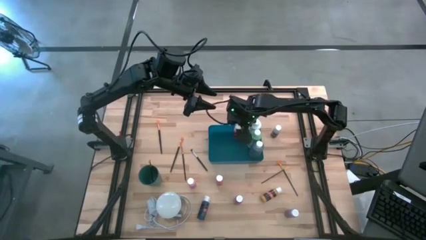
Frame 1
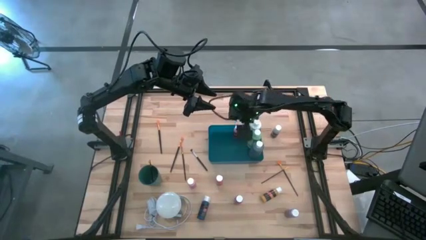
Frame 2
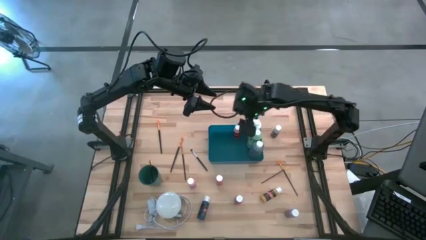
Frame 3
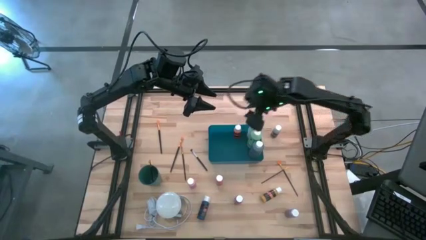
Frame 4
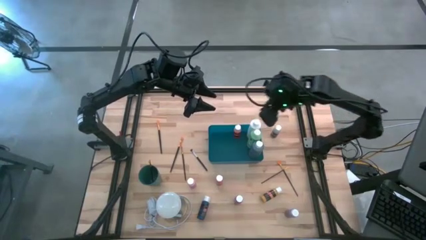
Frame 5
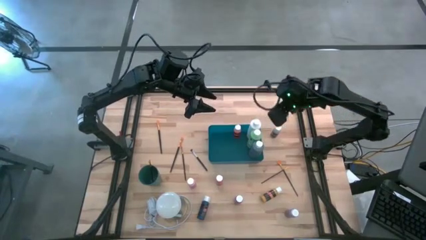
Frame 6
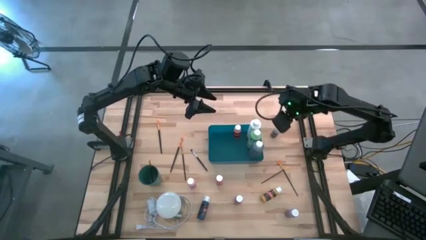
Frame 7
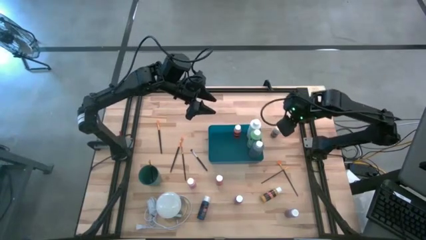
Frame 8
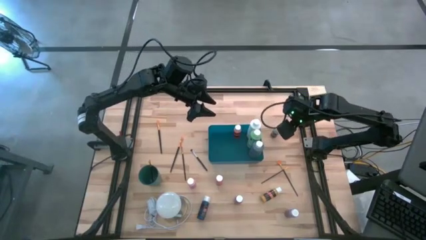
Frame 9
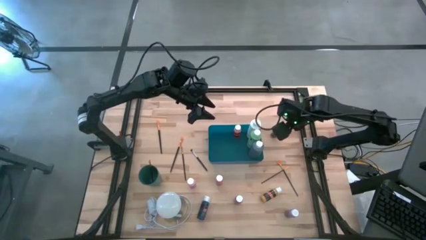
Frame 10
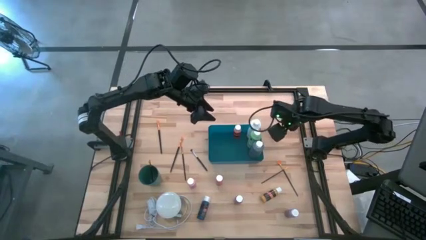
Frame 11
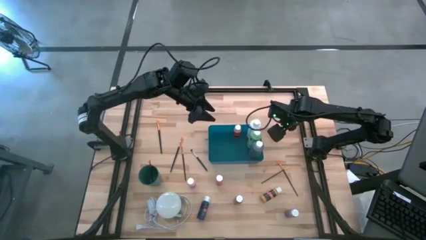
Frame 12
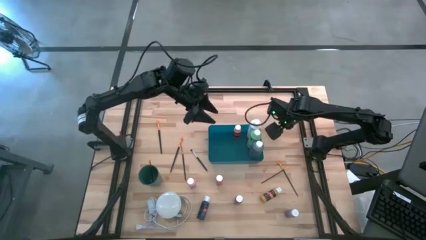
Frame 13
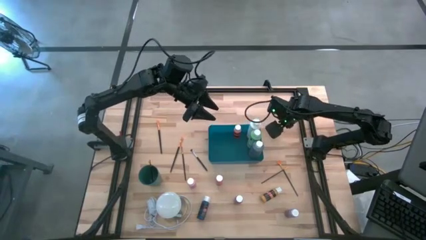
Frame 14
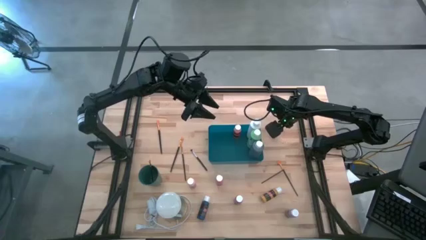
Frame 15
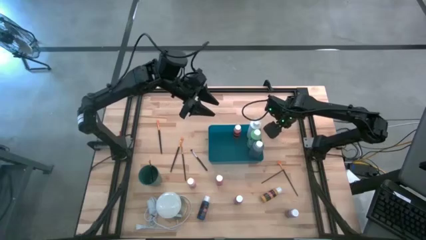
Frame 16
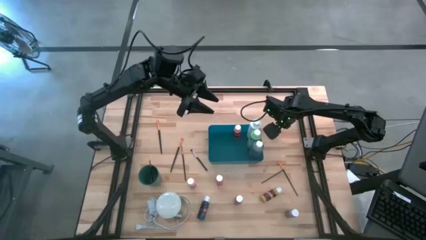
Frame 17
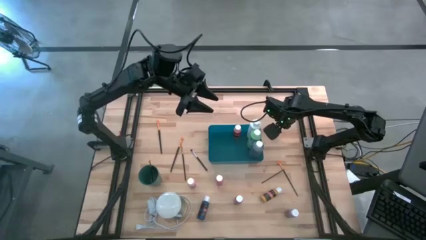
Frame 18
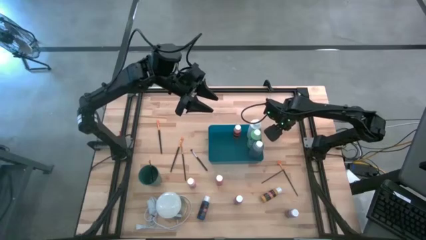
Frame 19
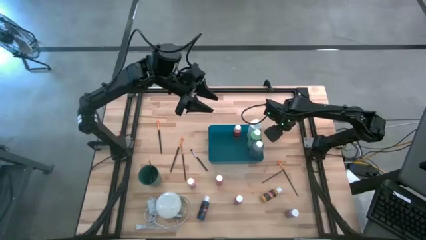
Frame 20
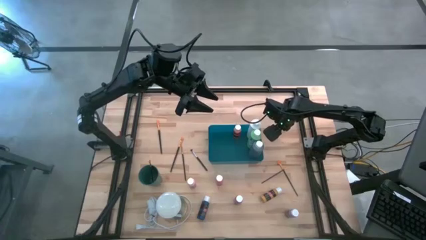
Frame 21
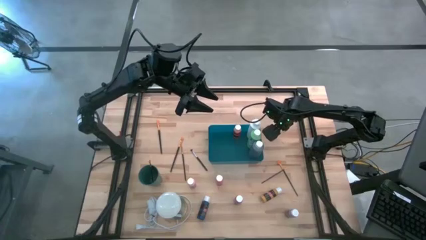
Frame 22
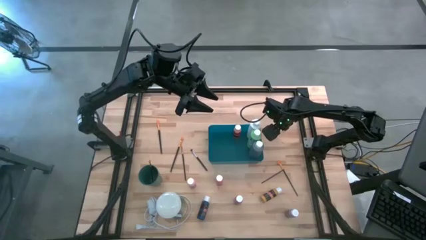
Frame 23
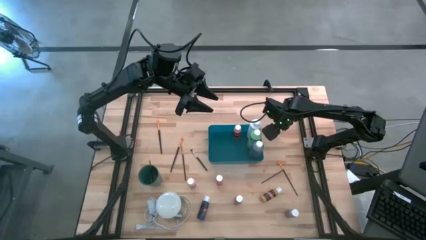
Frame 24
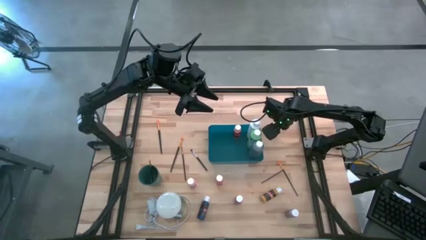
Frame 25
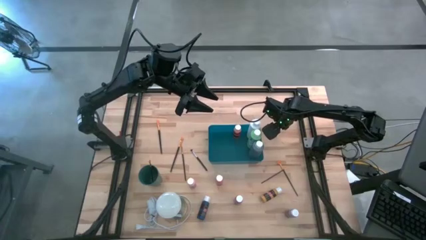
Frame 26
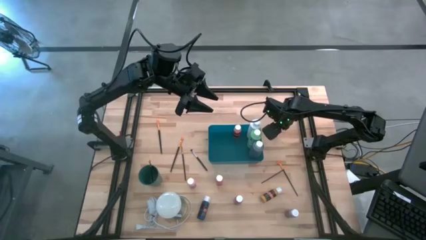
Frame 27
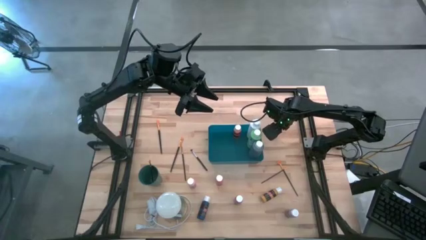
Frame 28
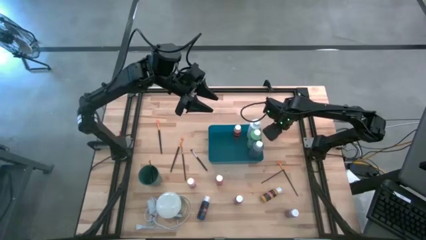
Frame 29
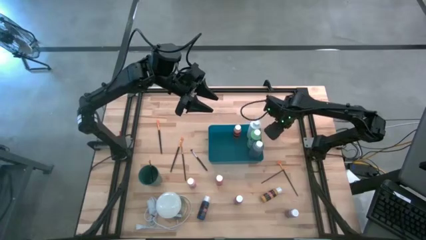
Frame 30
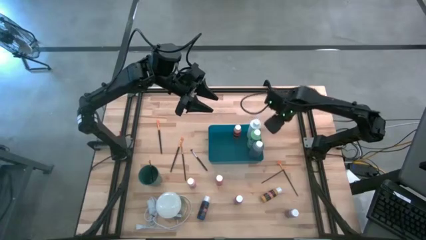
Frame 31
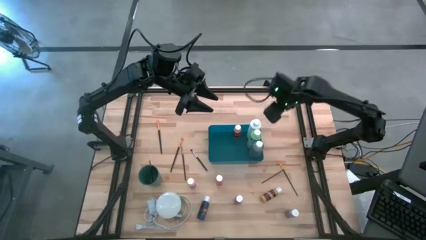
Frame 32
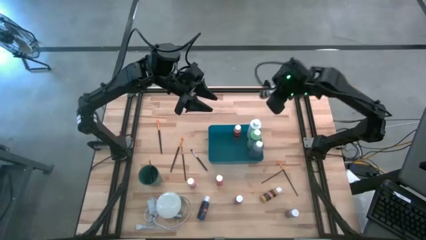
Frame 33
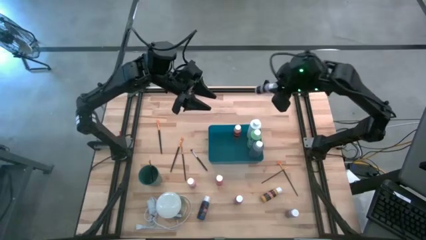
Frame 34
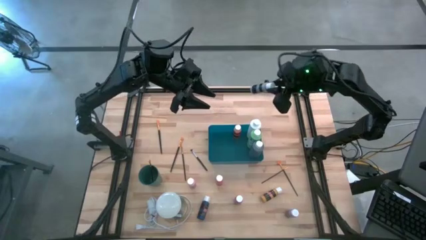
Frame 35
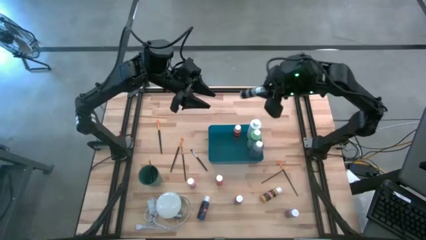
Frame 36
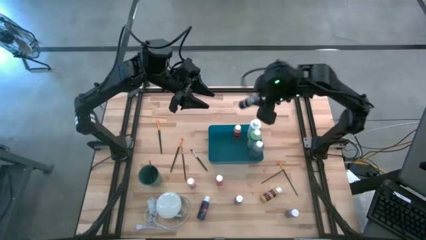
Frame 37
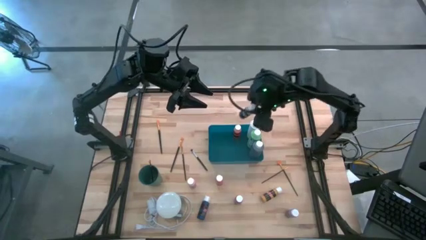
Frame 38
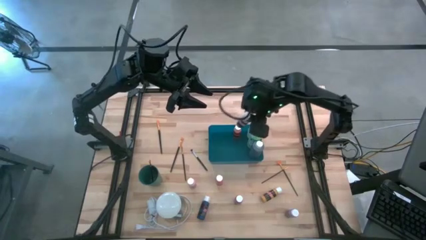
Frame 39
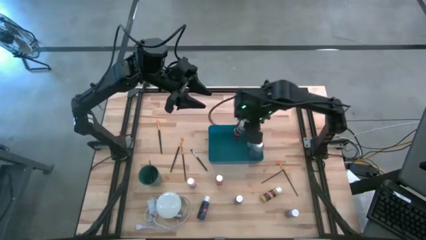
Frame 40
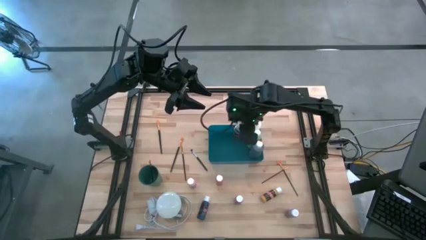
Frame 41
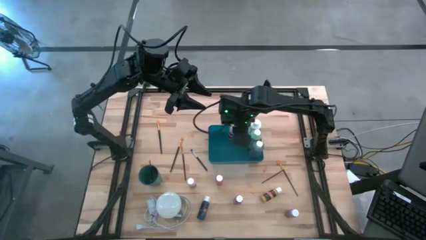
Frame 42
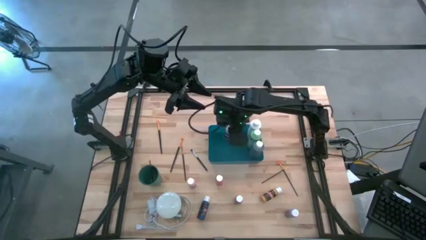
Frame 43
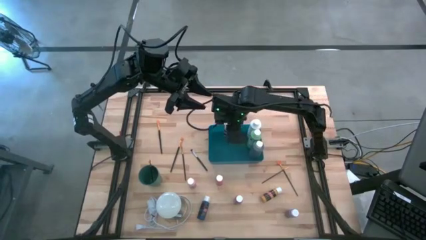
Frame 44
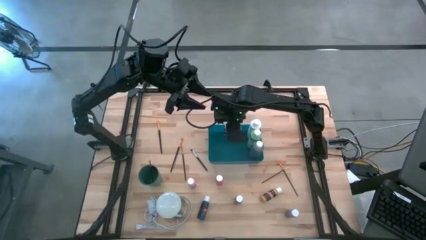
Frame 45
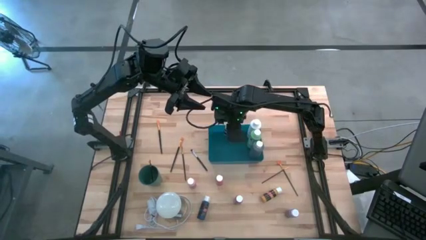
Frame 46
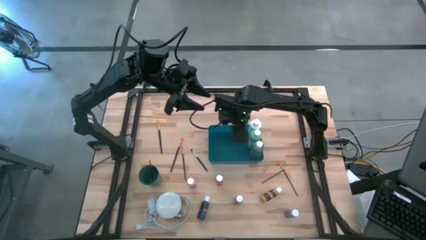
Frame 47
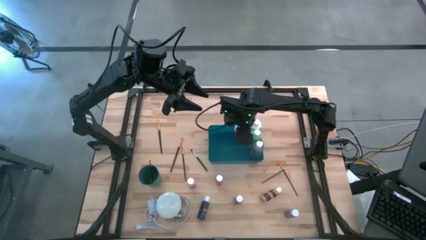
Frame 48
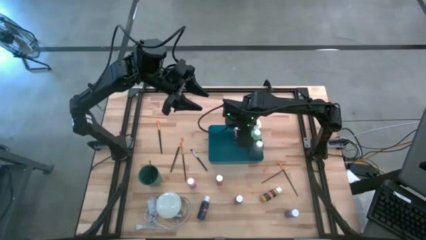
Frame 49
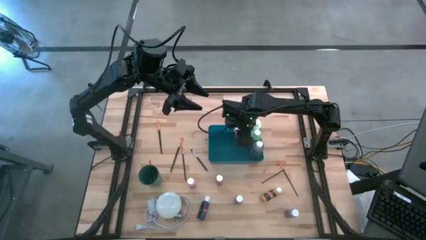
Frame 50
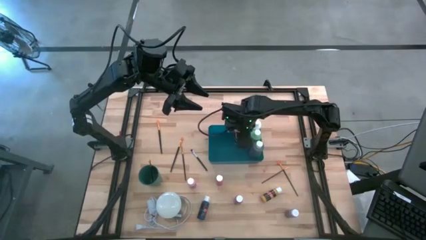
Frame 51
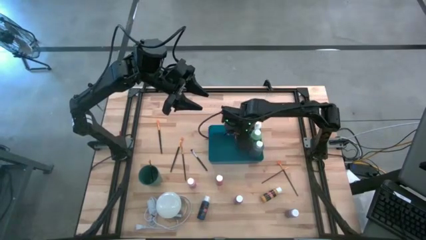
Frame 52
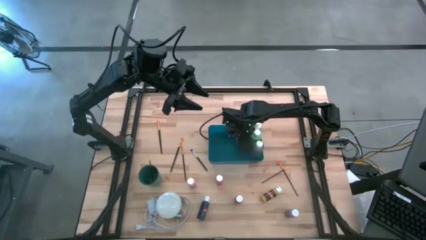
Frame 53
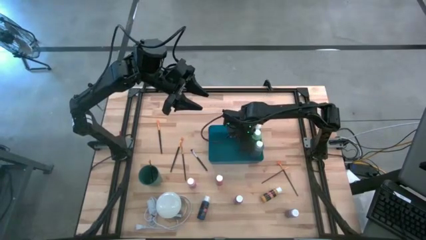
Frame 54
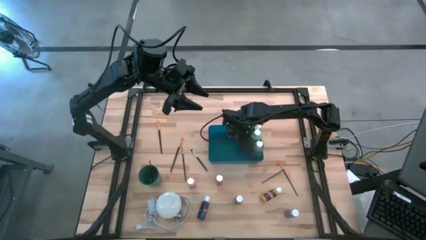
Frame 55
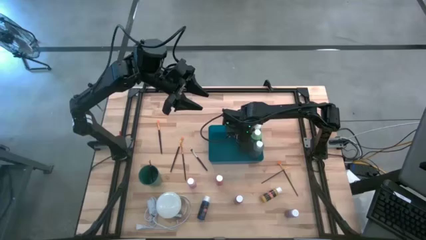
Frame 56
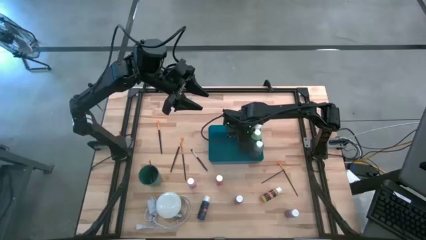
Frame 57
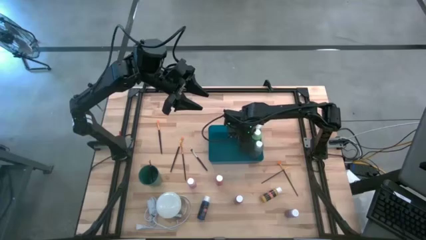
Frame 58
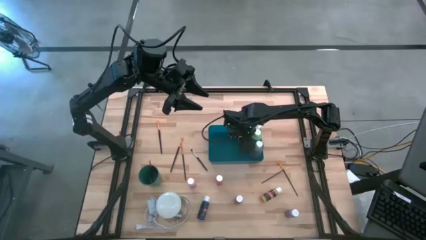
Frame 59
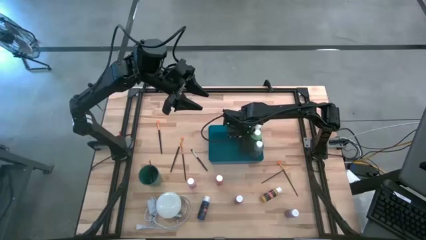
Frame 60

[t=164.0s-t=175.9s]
Task: Pick & Place Paint Supplies
Put the gray paint bottle into the blue bin

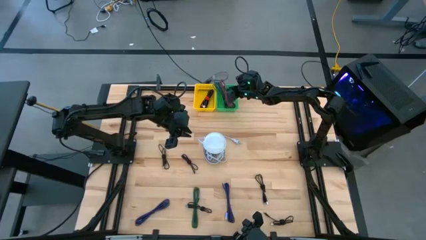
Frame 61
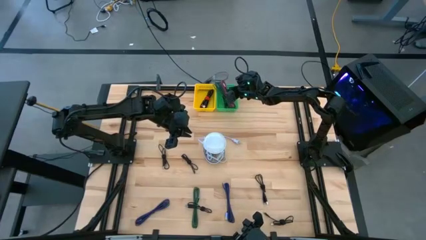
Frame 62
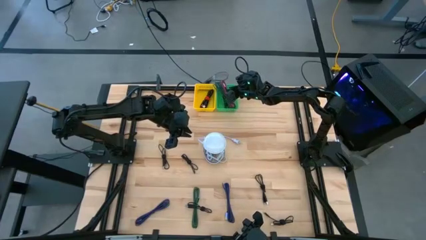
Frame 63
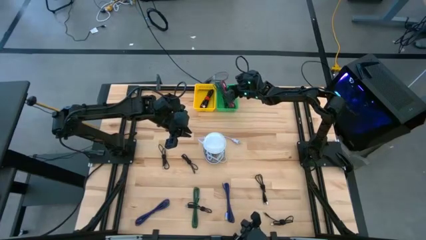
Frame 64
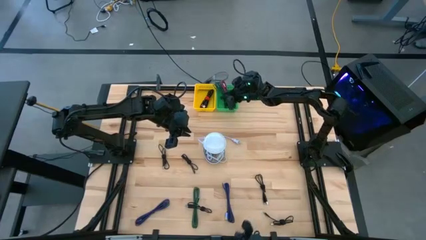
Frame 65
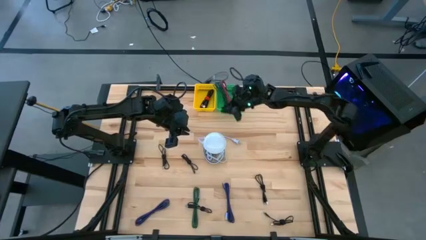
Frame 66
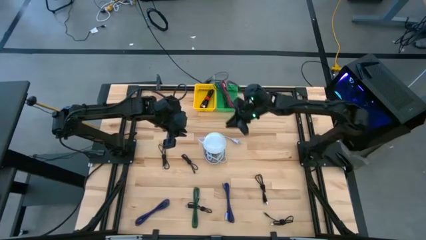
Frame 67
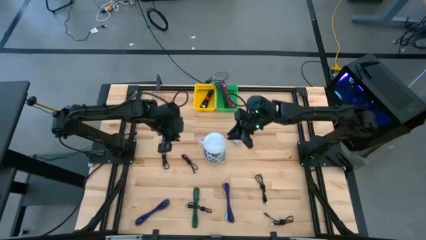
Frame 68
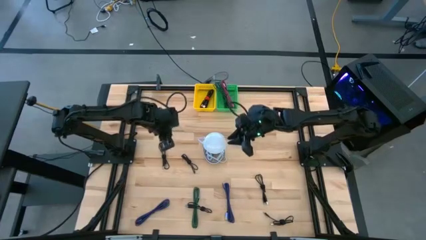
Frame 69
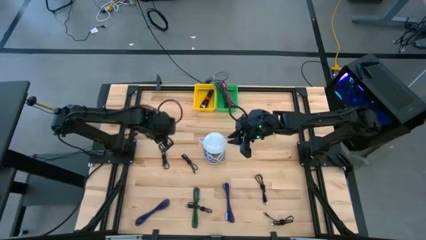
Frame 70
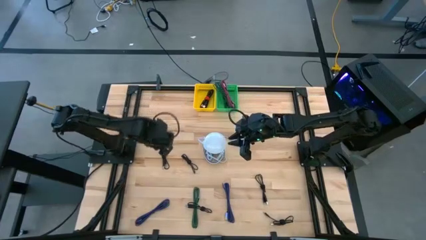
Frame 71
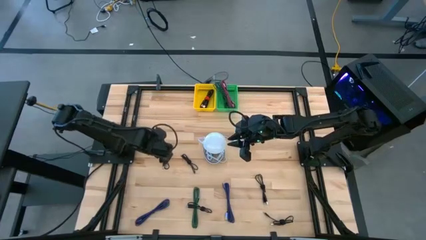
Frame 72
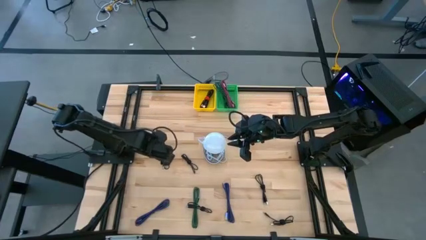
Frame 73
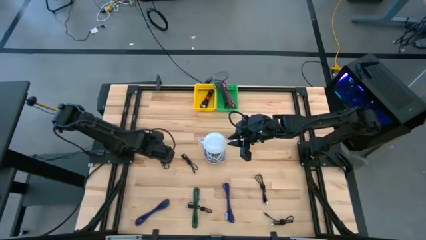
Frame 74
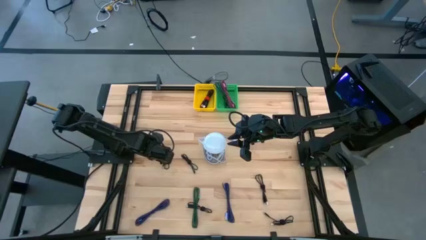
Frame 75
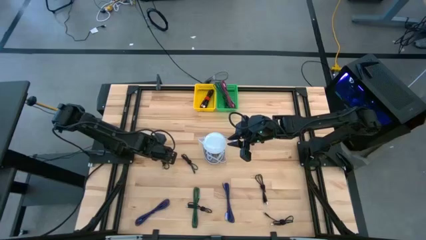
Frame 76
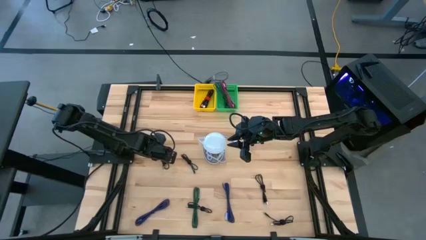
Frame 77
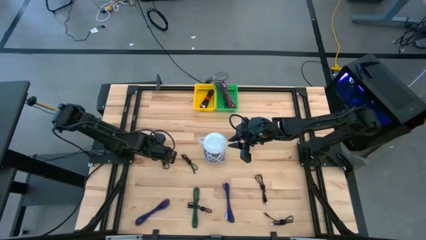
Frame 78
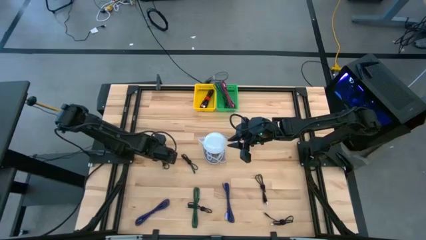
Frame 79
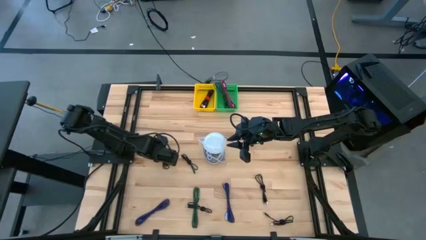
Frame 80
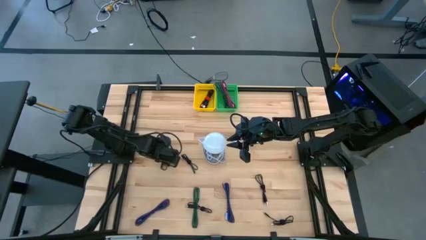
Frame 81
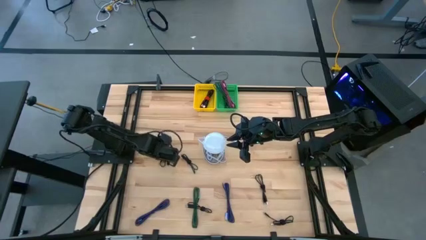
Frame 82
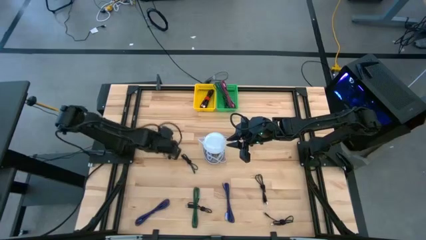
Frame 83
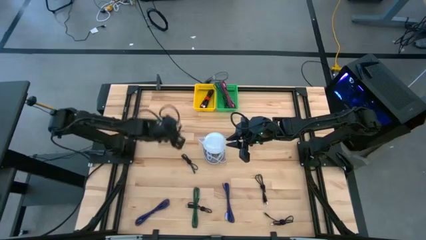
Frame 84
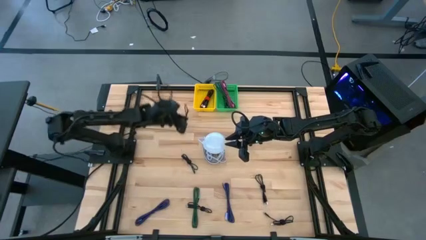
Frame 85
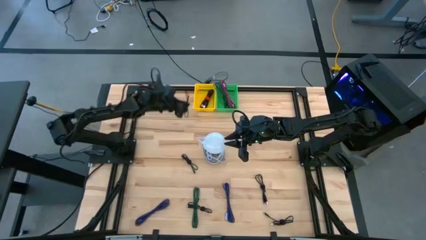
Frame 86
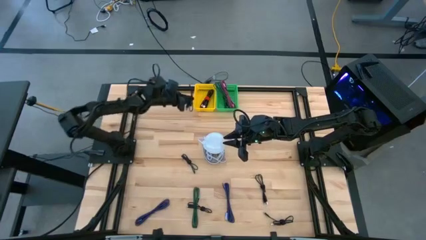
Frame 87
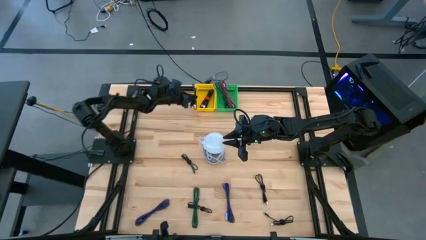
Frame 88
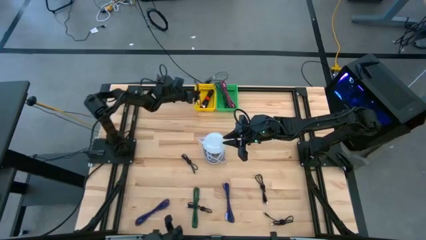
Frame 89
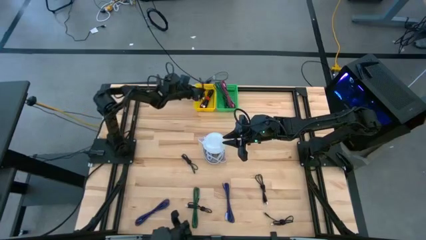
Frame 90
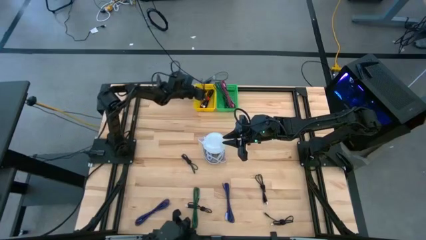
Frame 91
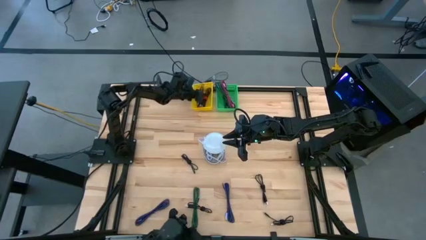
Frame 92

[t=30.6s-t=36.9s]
Task: Pick & Place USB Port
Put the black charger cable into the yellow bin
